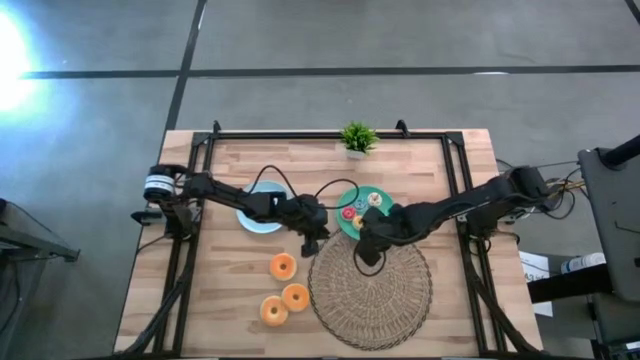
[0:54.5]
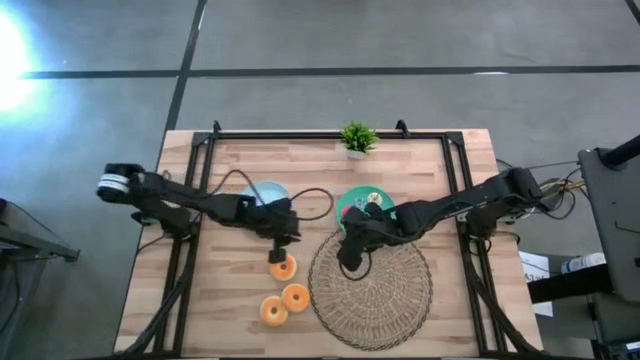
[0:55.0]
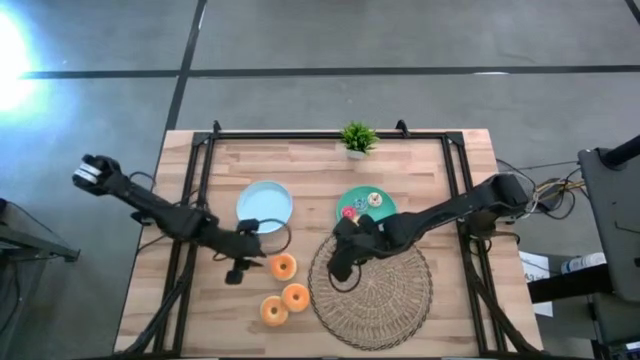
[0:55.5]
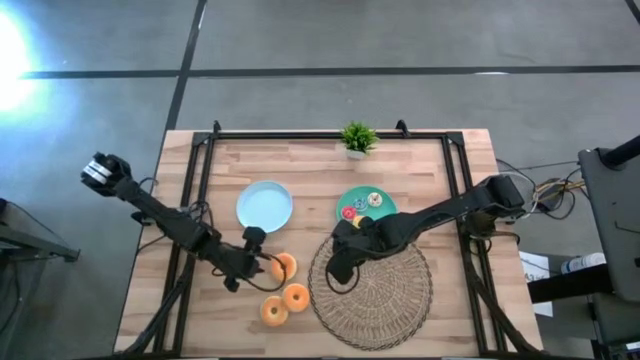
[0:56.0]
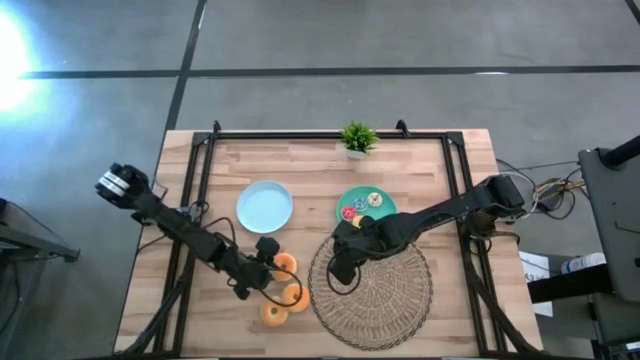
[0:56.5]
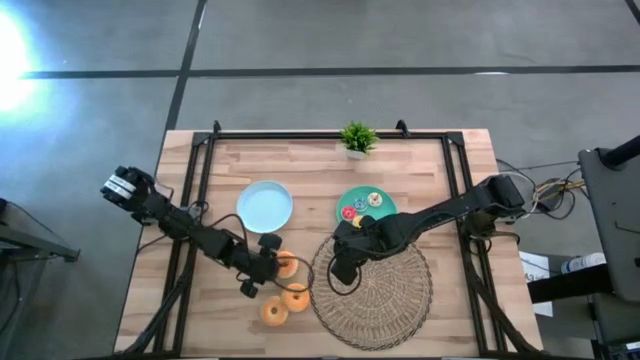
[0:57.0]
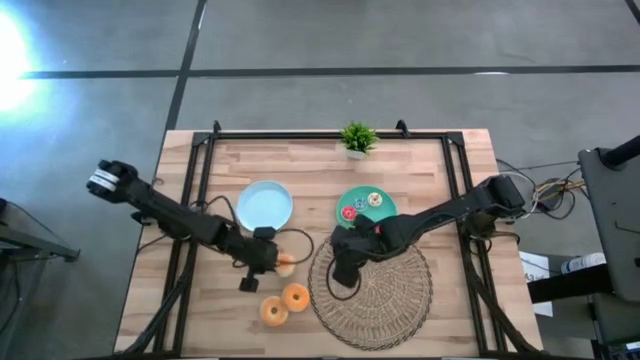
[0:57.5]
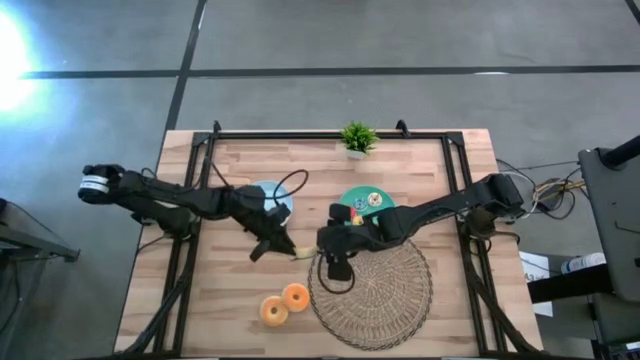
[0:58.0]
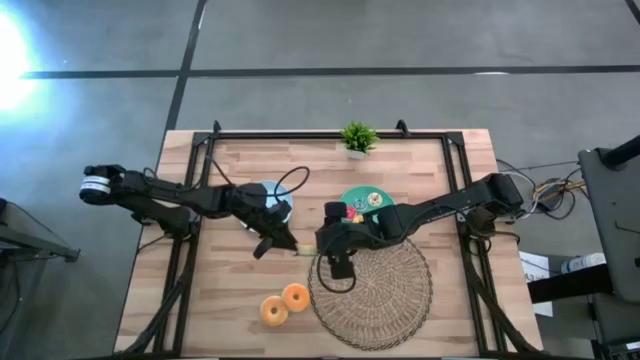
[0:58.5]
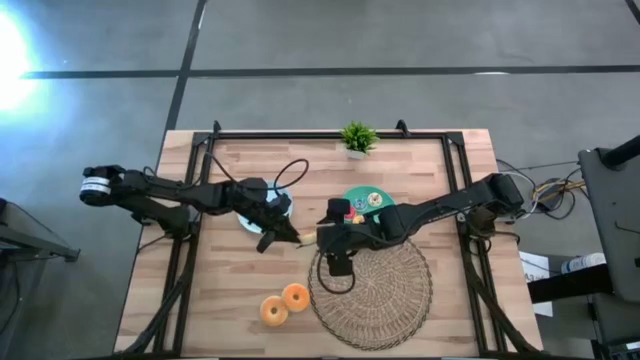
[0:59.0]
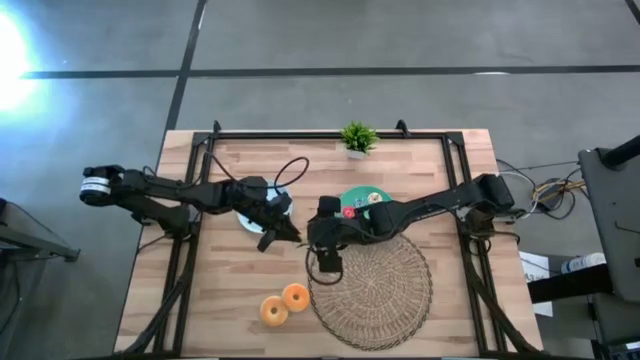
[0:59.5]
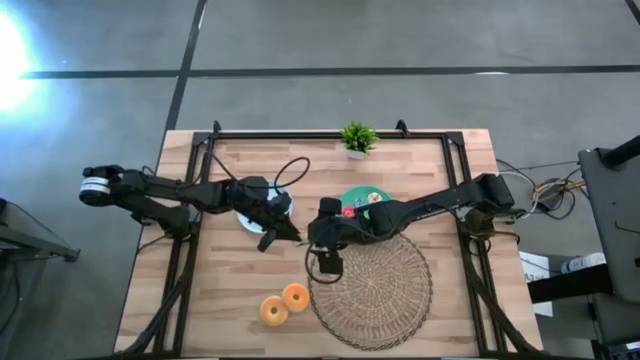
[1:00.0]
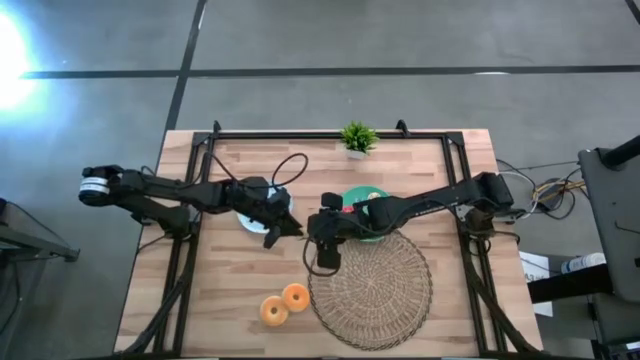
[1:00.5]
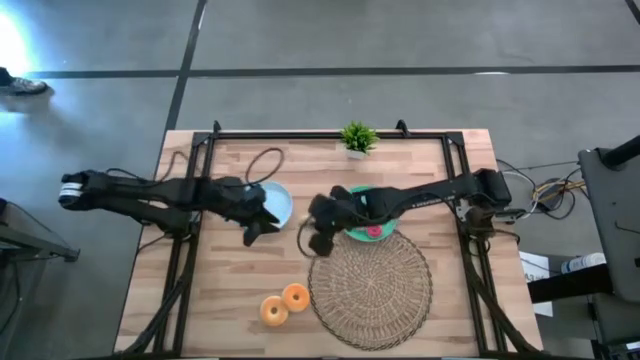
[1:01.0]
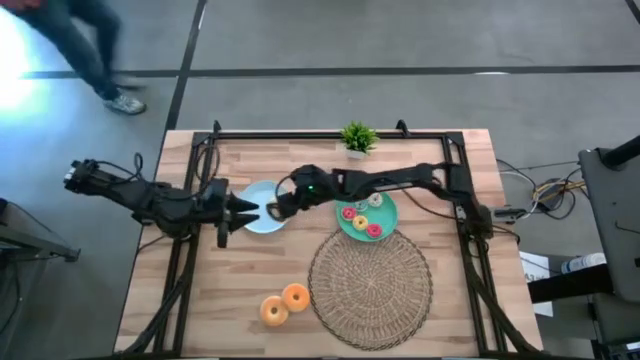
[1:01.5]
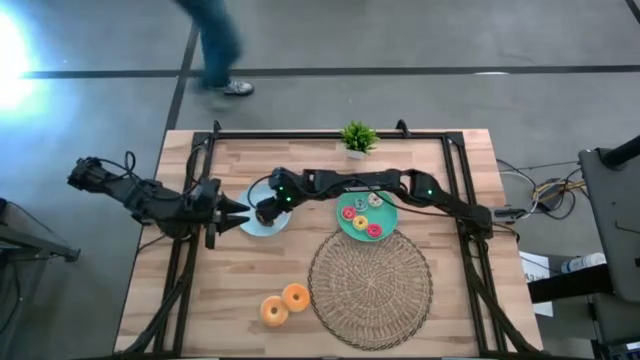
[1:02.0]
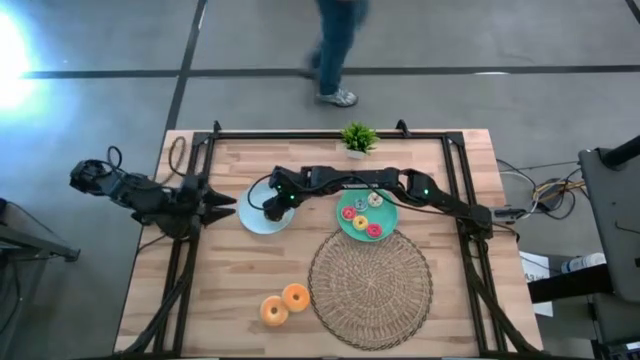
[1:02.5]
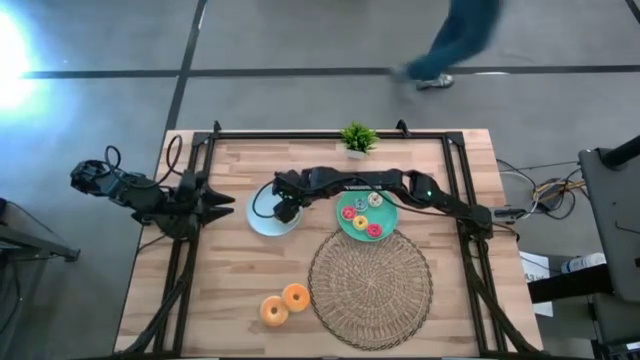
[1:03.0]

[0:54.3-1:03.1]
Task: Pick & Place donuts
Put the big black donut on the blue plate

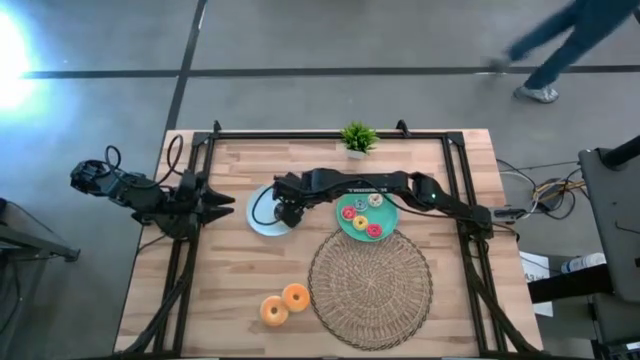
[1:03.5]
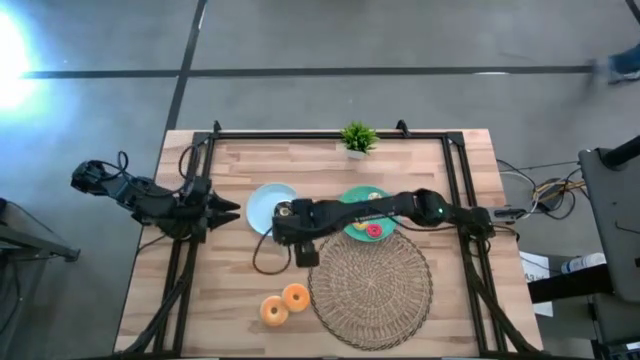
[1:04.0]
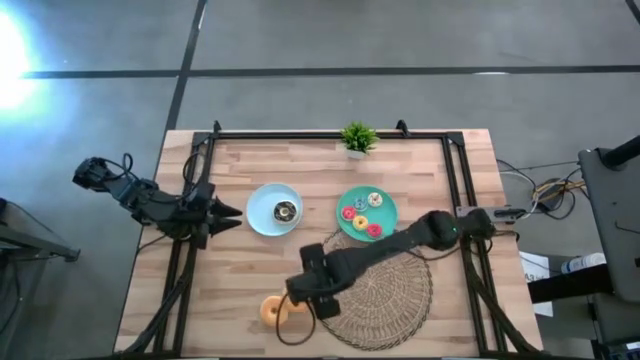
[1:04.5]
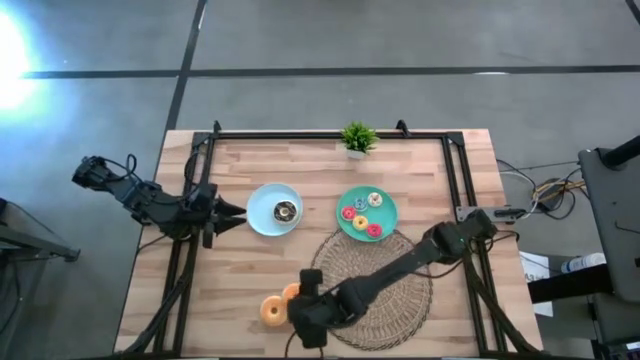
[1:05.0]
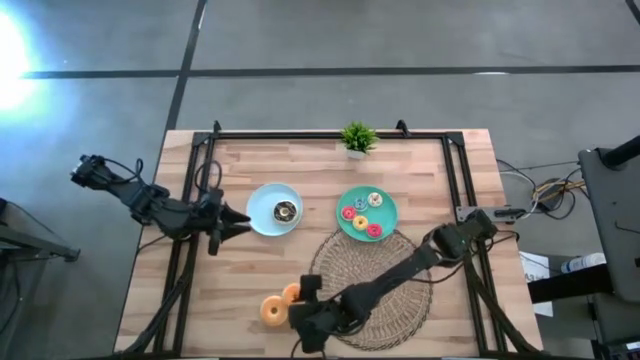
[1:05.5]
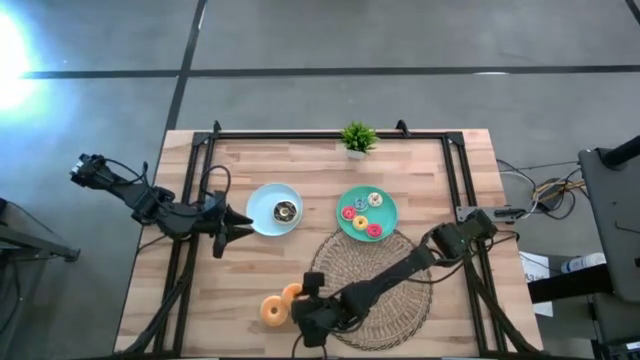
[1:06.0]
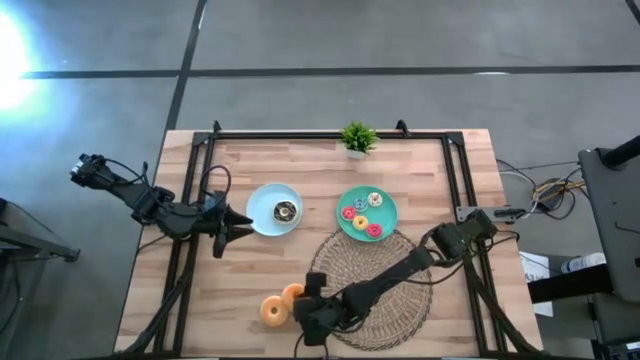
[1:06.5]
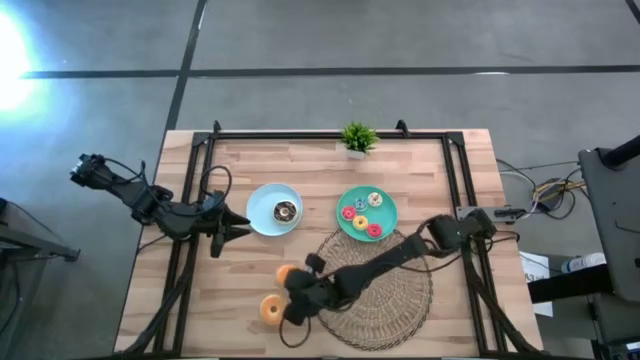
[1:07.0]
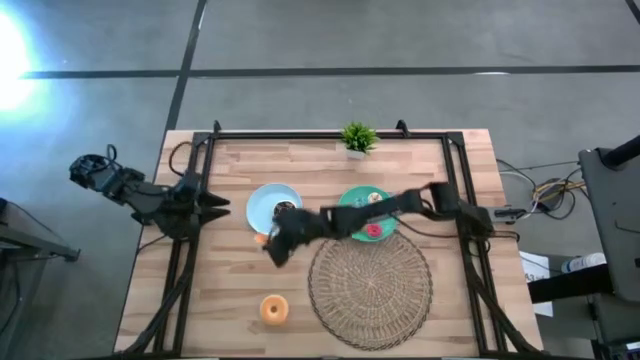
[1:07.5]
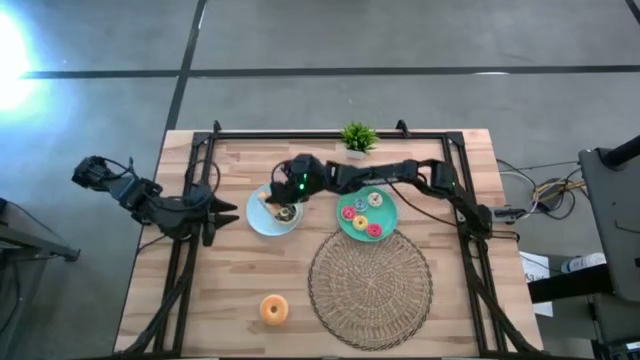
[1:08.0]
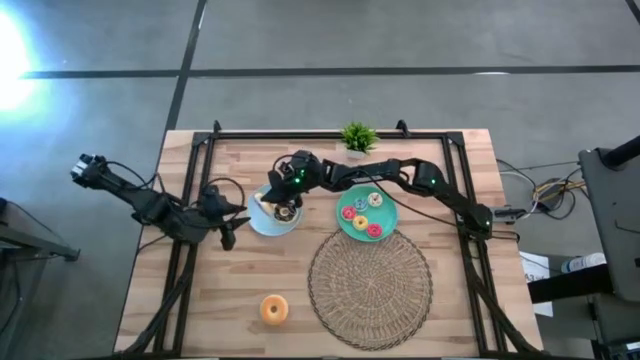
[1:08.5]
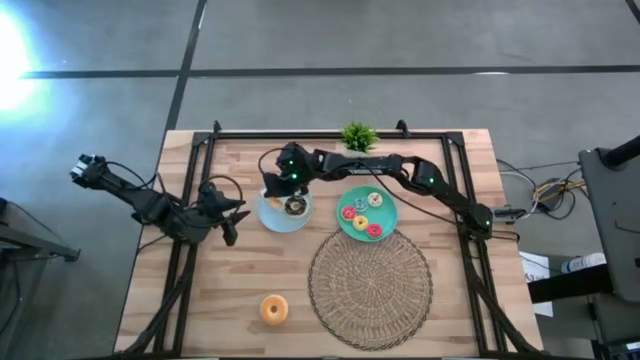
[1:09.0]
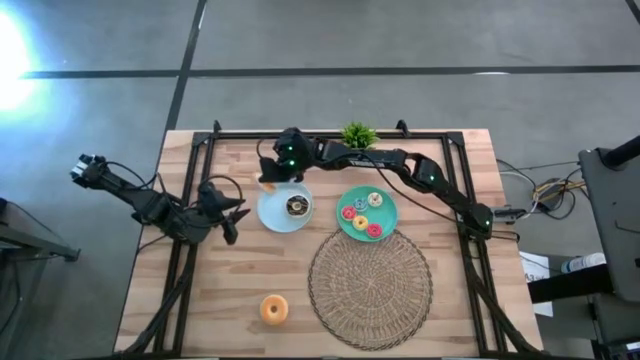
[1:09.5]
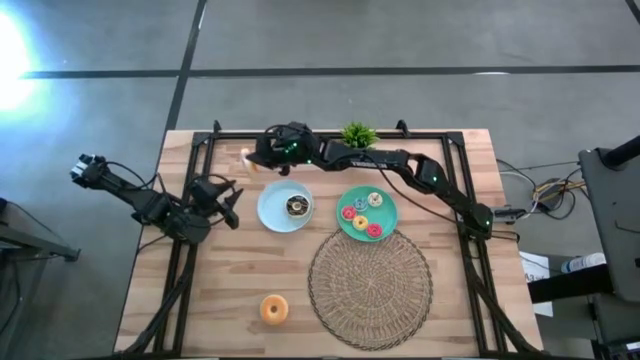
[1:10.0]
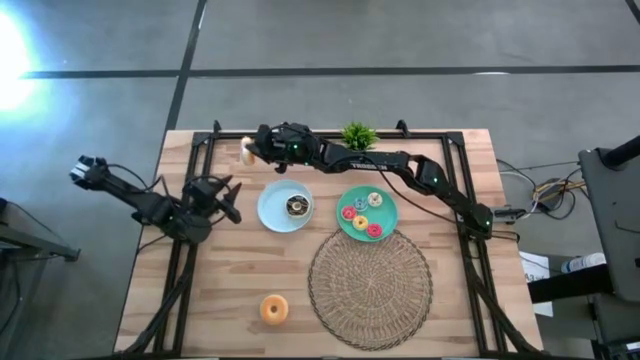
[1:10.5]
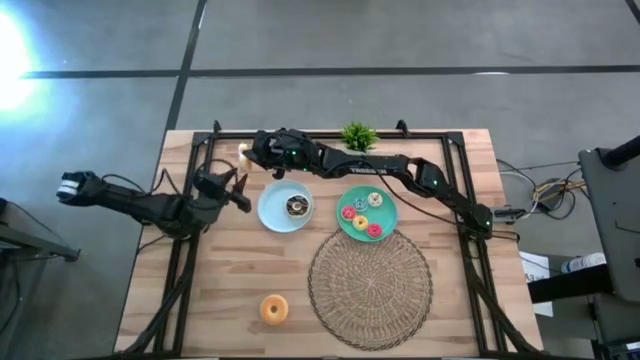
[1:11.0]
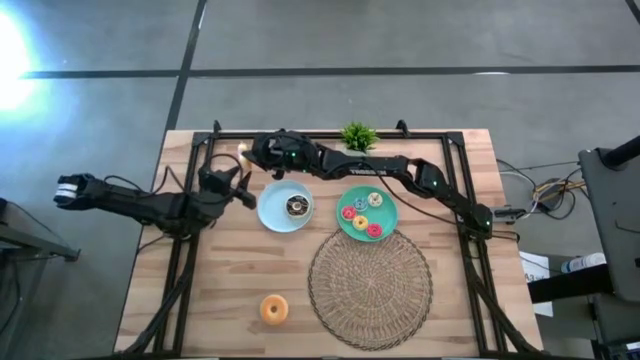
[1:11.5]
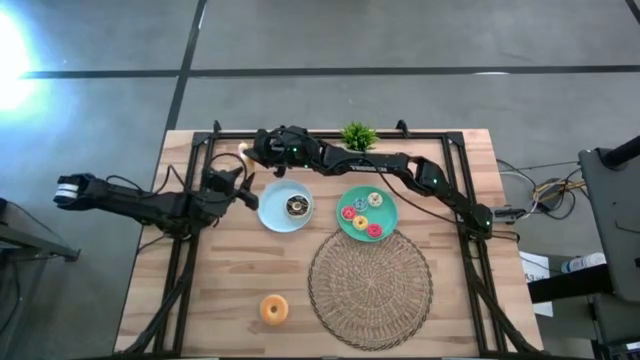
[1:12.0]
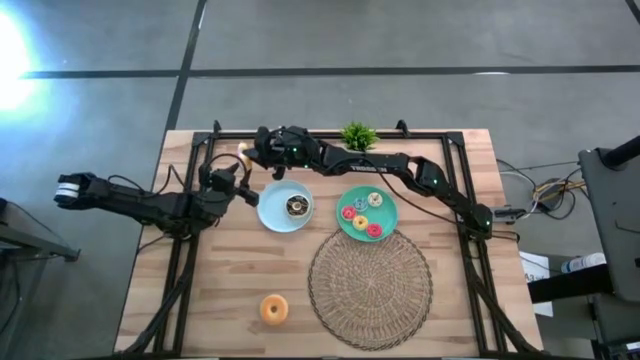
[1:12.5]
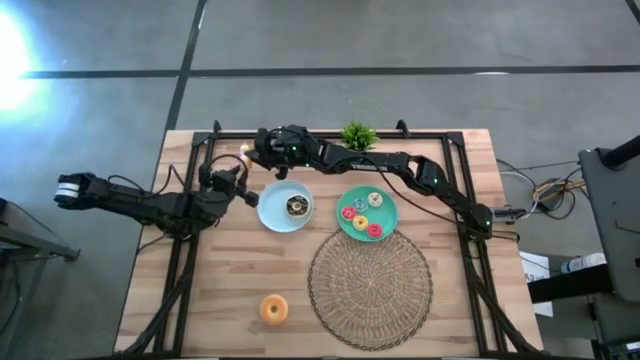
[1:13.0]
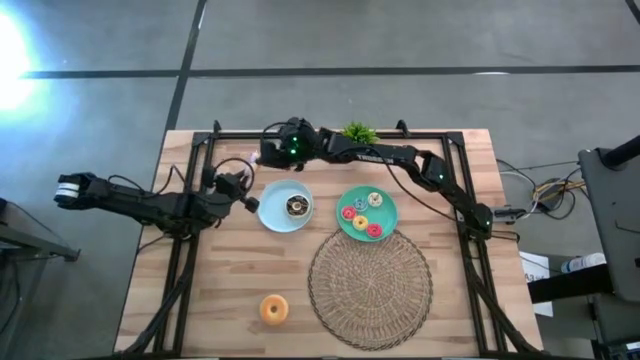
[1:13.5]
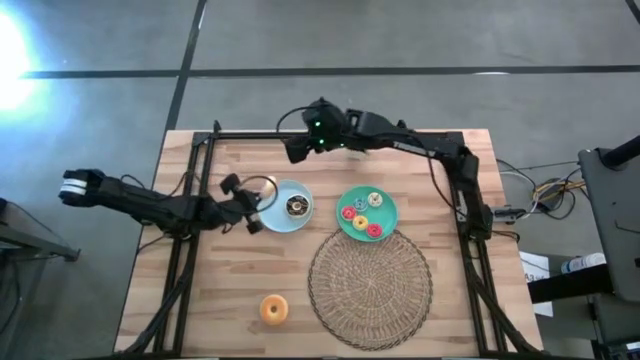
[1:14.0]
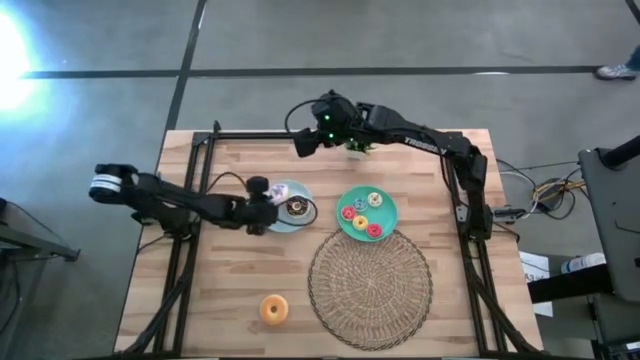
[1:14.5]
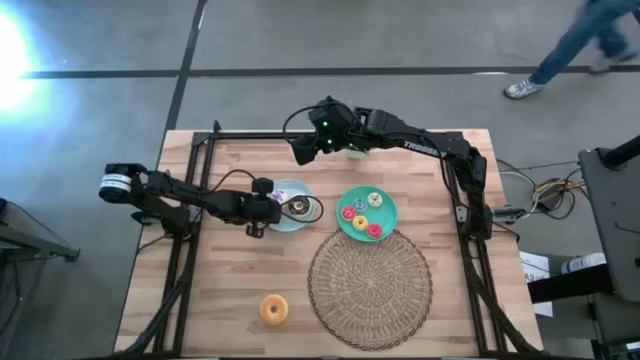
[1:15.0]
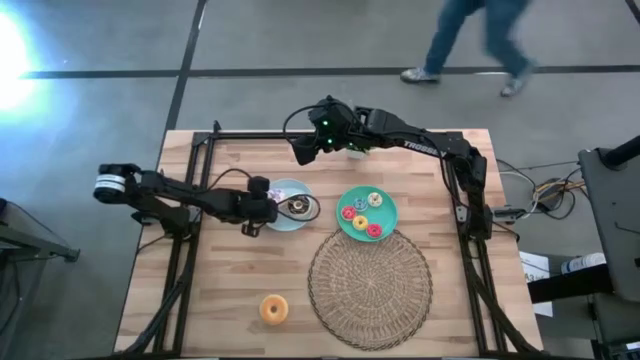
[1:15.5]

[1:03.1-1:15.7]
Put the big purple donut on the blue plate
